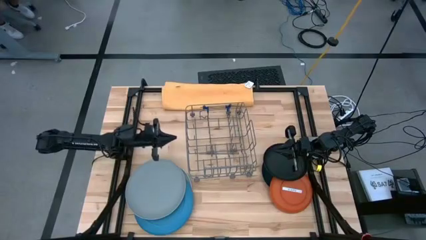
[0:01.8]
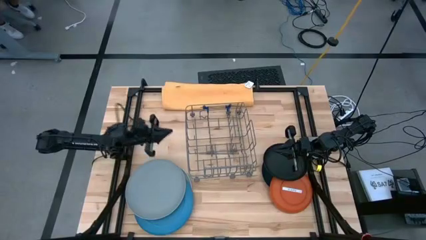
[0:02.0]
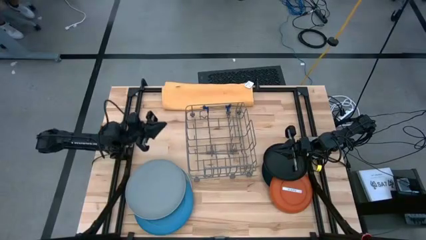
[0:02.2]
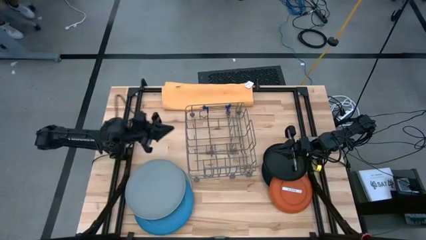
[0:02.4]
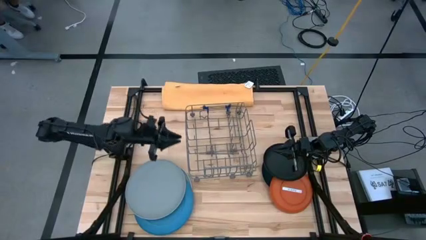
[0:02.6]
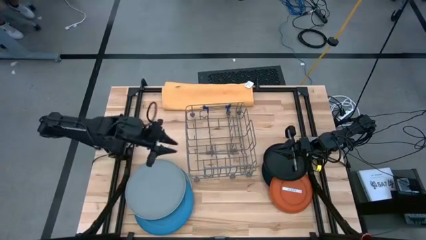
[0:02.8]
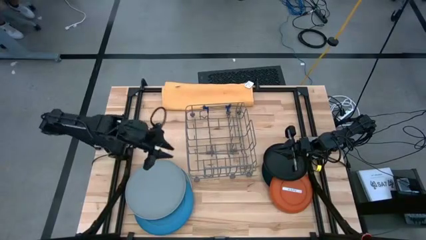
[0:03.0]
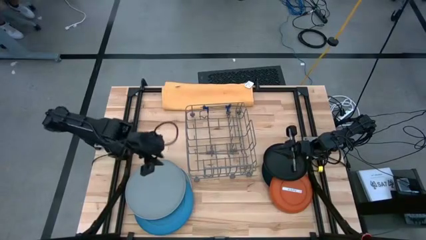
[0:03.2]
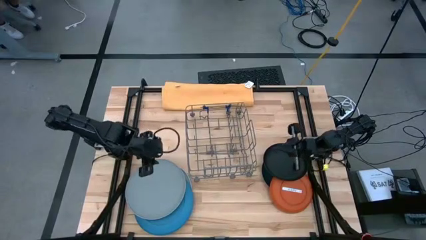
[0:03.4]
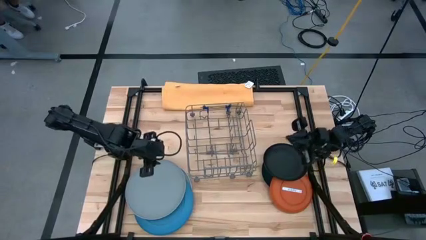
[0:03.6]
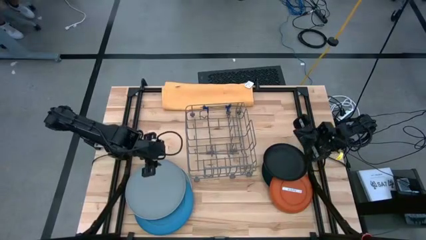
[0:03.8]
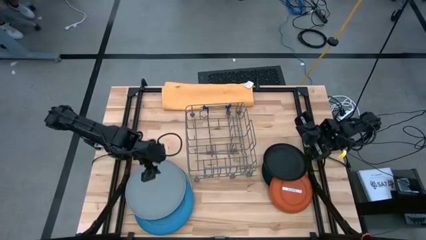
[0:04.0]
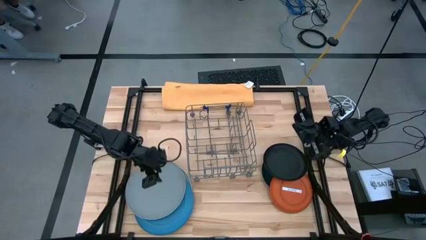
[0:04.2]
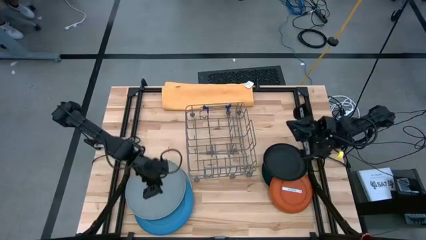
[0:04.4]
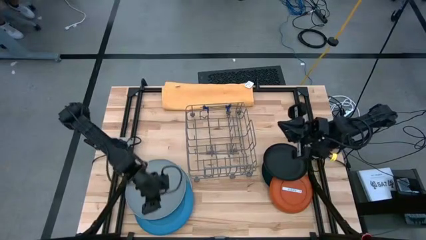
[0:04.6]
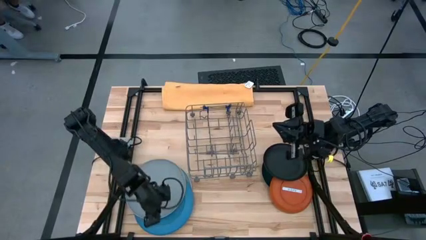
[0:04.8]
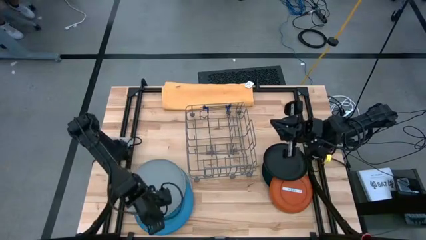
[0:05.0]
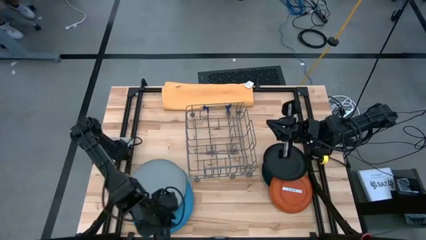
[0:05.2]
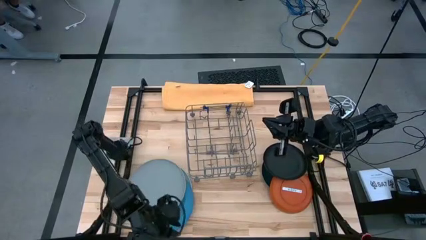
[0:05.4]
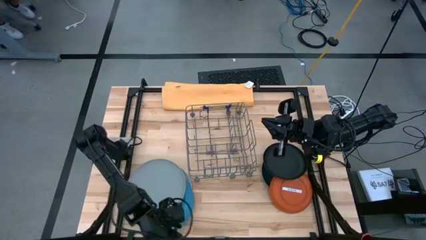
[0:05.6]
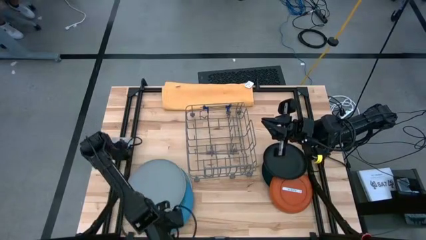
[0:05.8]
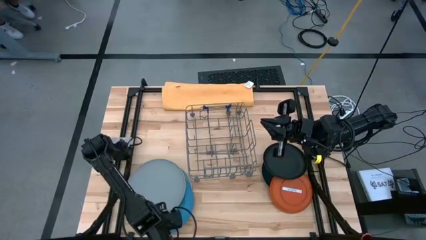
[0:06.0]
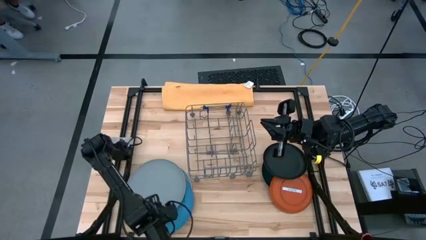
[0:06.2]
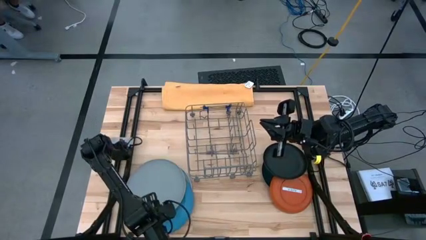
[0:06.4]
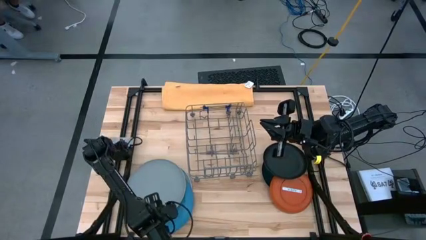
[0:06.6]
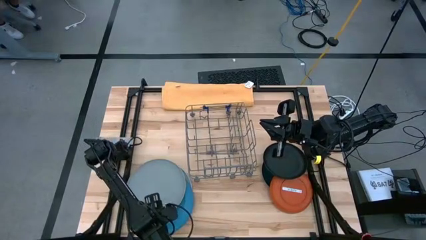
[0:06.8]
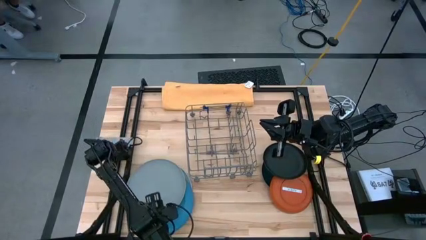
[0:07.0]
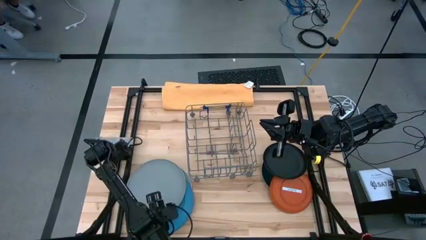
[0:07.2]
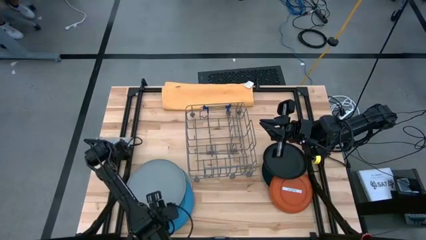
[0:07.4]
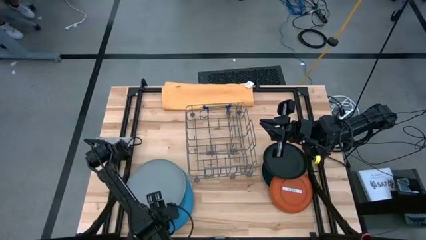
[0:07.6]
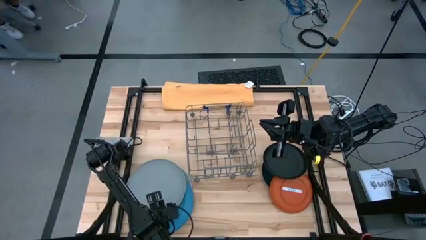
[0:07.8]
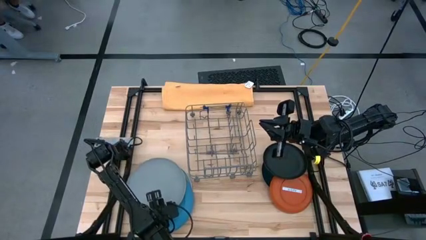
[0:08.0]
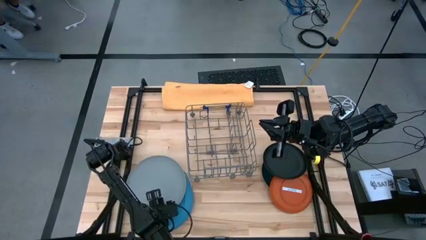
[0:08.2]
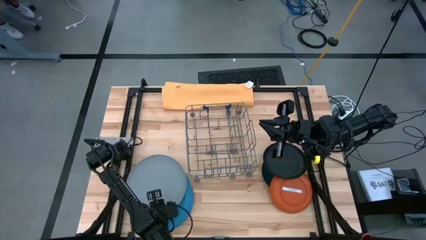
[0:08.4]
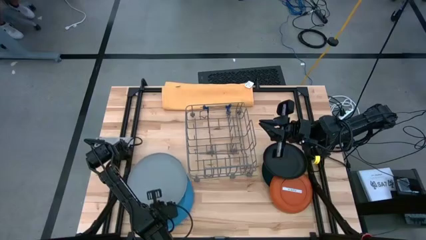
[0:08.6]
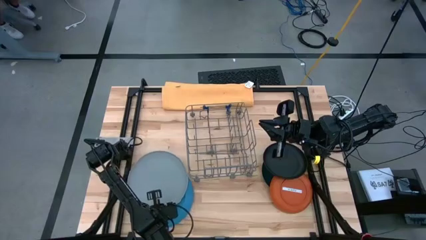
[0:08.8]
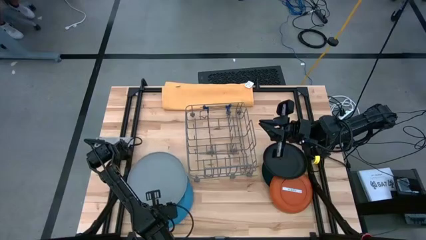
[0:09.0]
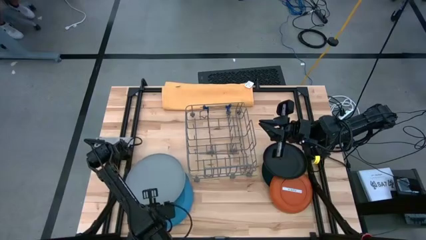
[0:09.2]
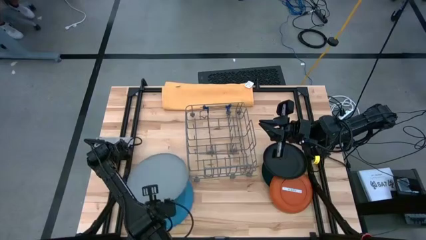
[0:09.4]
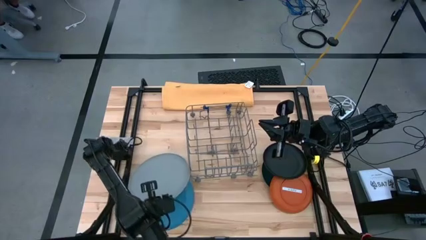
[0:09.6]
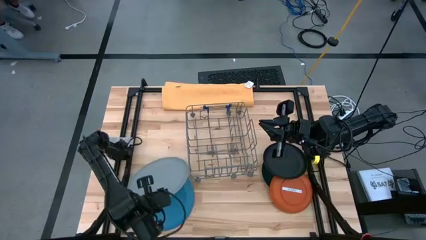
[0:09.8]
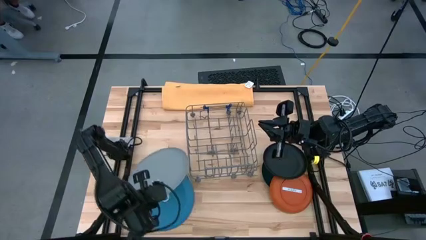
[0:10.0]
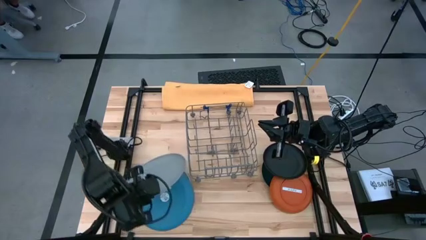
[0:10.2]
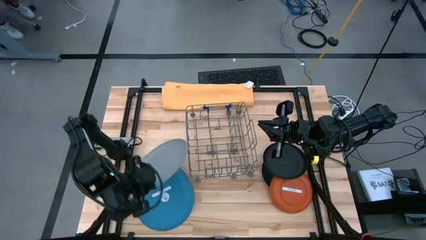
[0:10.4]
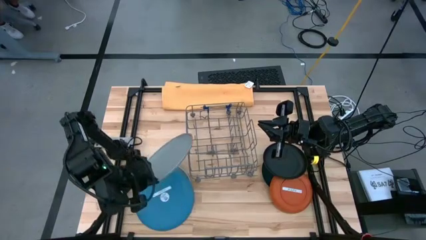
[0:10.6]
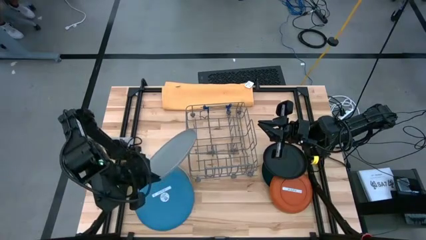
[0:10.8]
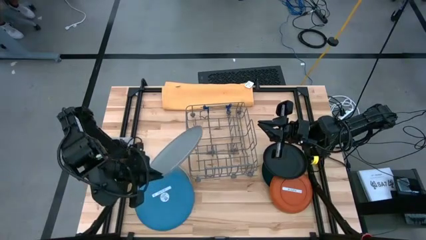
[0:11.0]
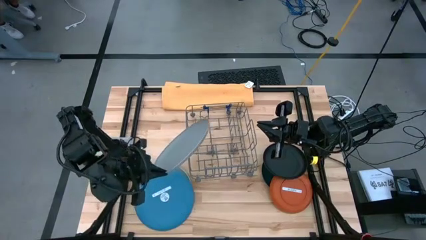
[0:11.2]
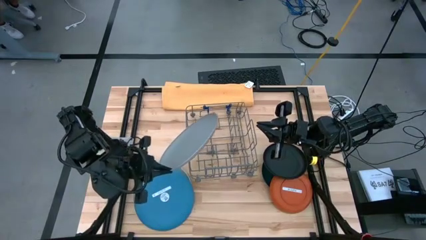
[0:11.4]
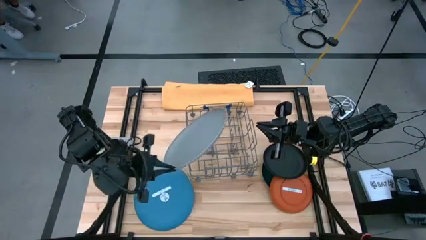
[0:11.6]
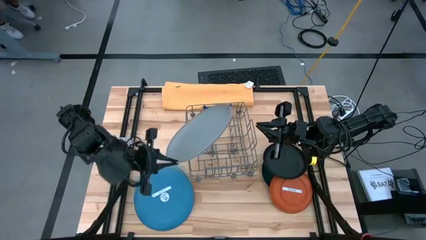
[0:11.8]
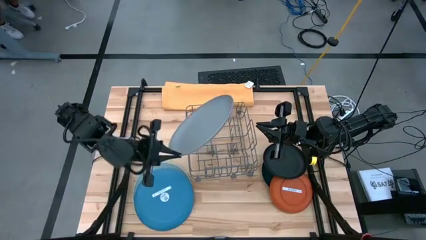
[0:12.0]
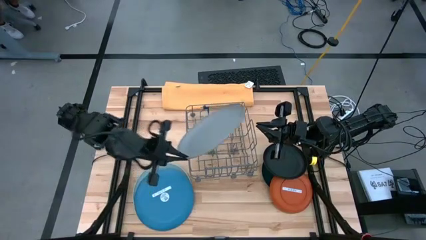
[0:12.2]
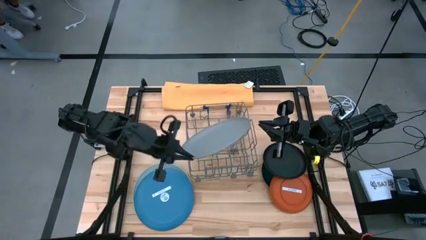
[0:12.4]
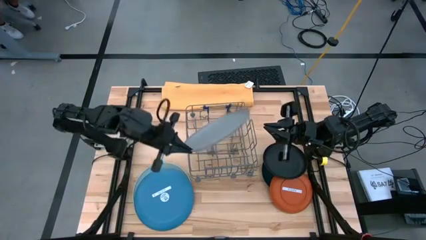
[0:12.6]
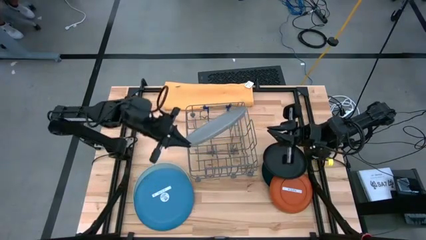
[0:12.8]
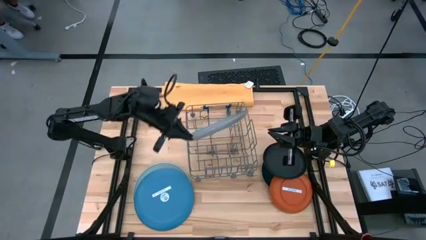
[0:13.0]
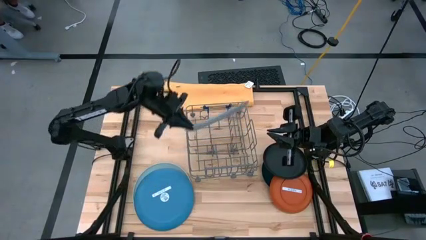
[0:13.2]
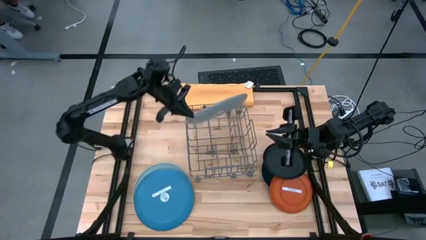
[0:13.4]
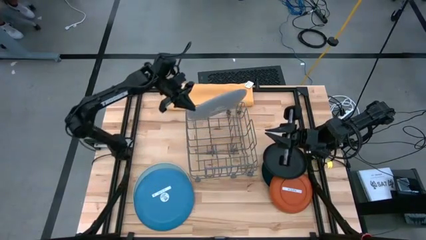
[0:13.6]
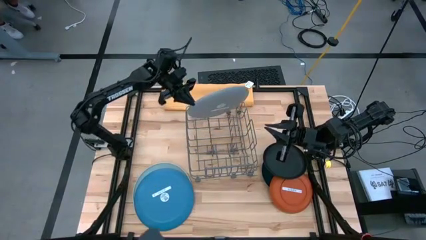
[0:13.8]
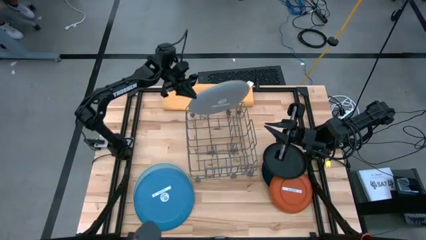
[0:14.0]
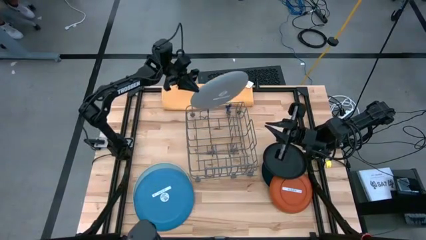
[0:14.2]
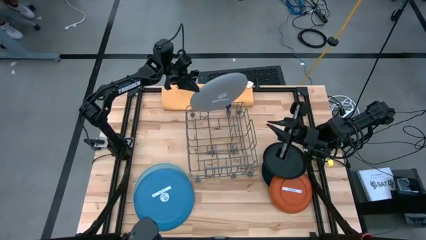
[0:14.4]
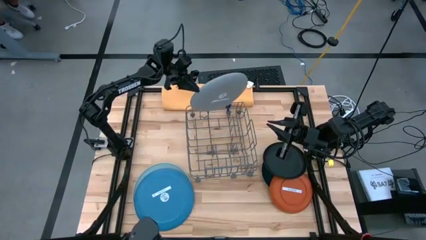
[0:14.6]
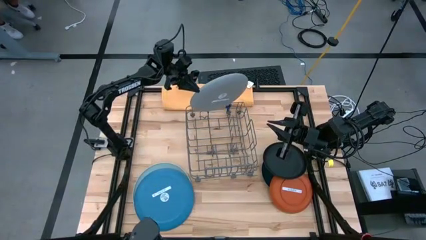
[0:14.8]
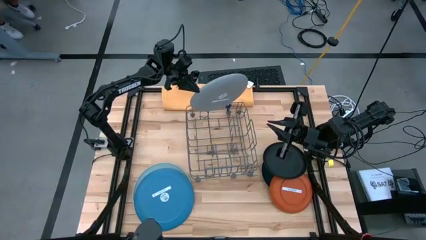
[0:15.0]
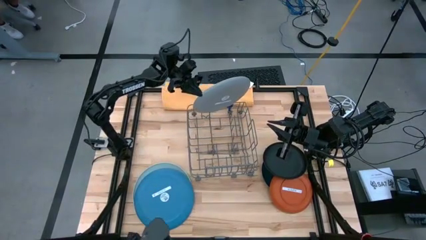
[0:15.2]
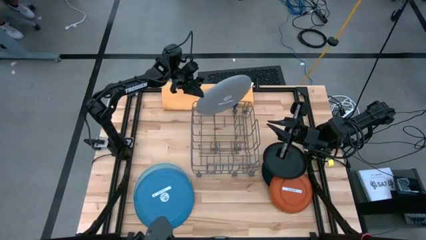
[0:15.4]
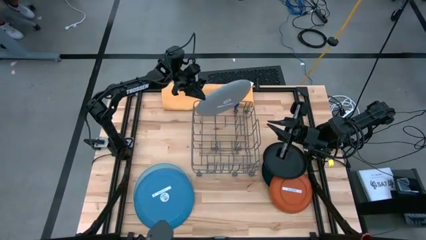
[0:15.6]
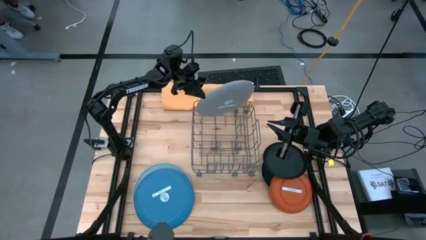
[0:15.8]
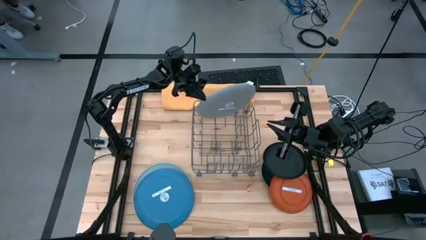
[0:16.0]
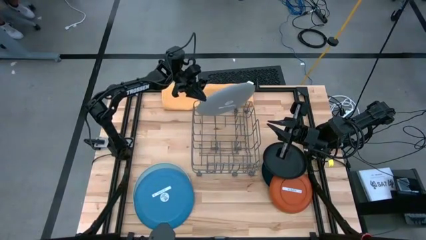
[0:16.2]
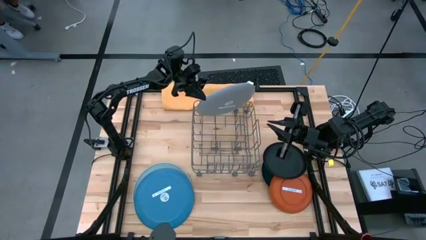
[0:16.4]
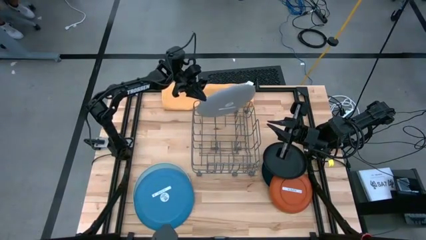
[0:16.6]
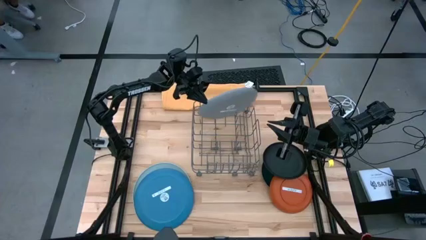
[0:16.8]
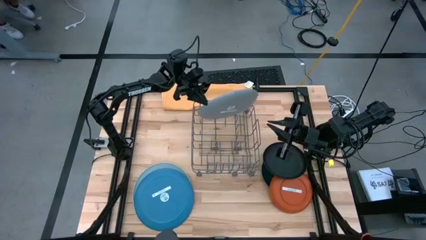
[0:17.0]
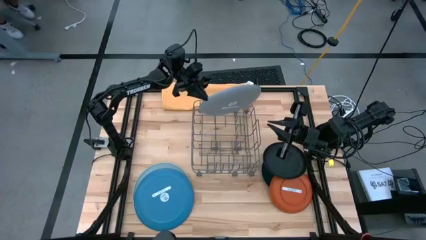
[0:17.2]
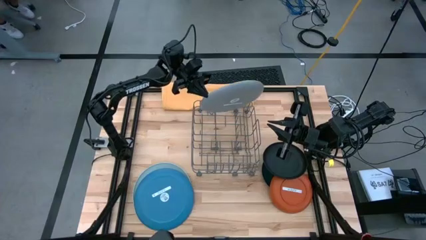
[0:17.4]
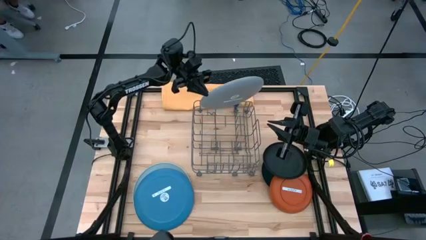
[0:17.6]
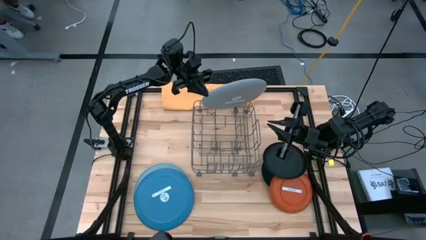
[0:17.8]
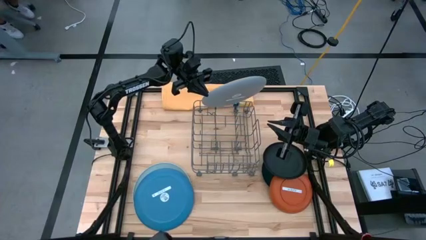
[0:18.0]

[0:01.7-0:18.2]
Task: Sort dishes
Put the gray plate into the dish rack
